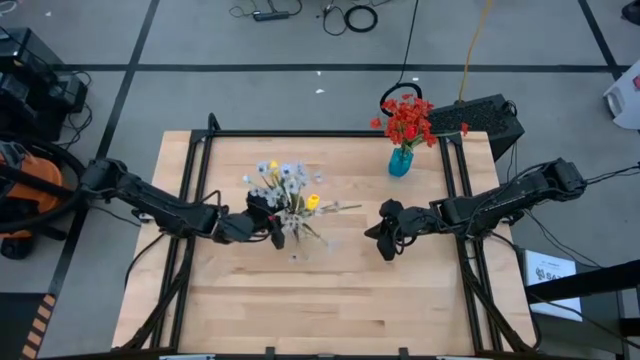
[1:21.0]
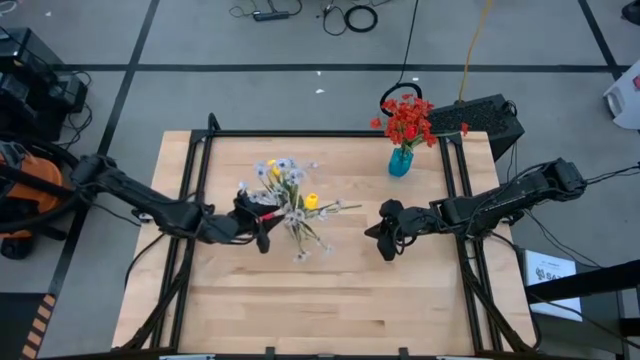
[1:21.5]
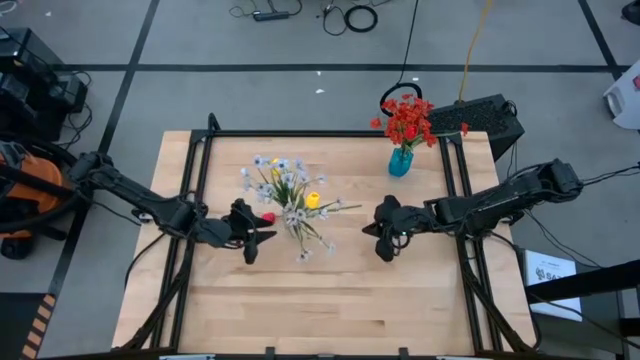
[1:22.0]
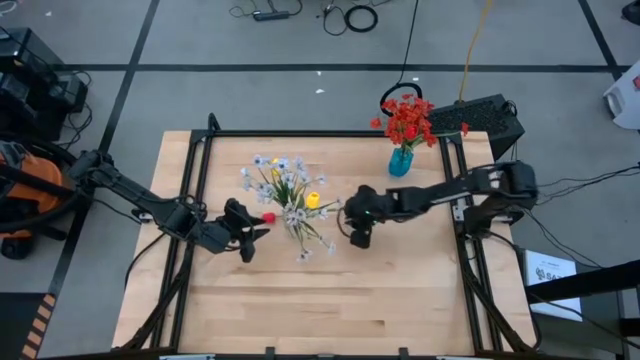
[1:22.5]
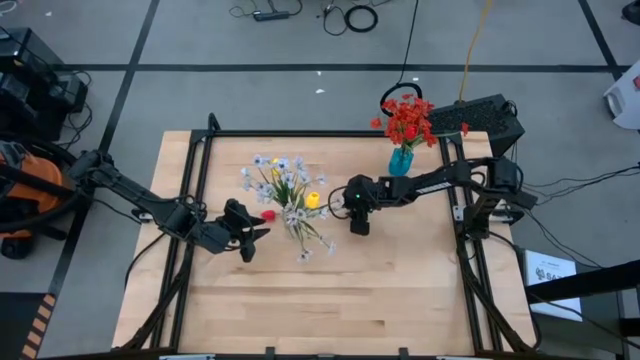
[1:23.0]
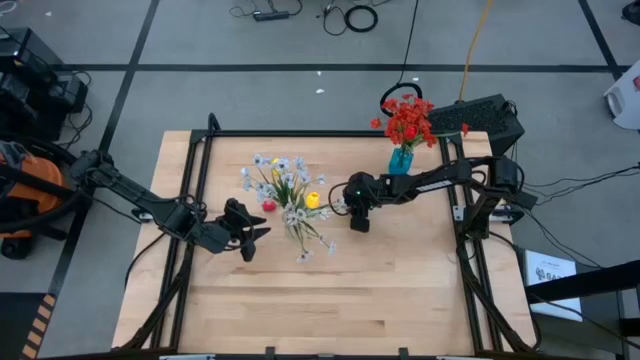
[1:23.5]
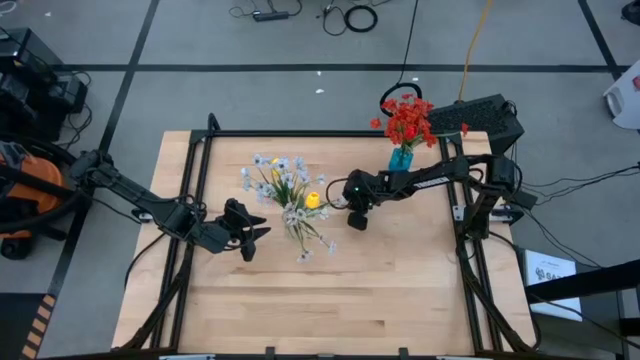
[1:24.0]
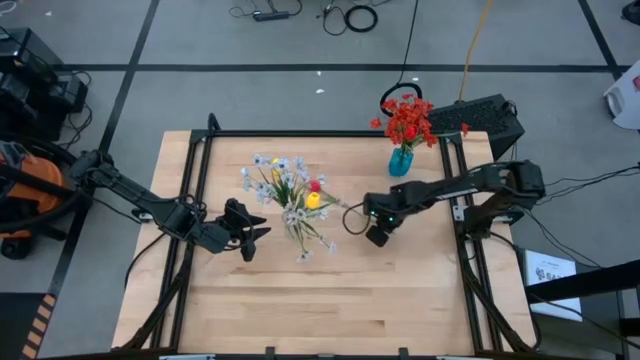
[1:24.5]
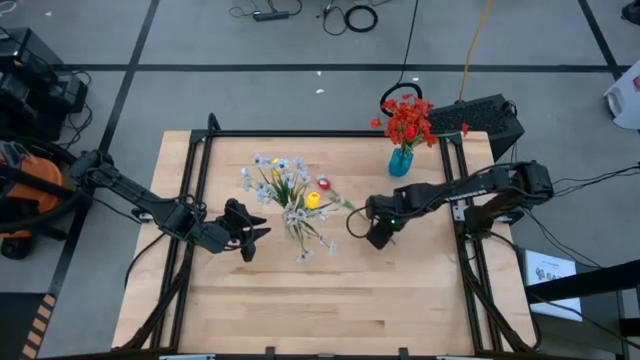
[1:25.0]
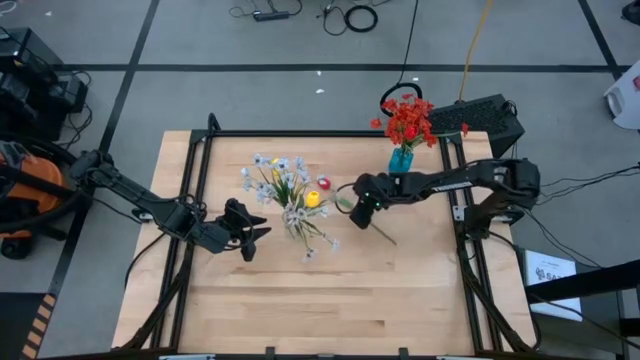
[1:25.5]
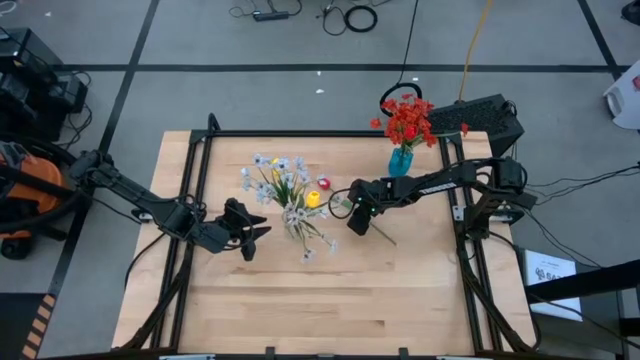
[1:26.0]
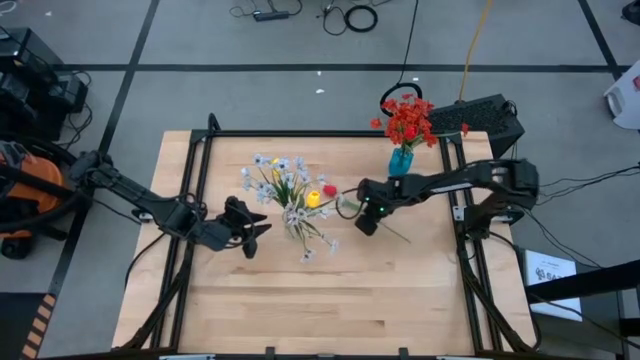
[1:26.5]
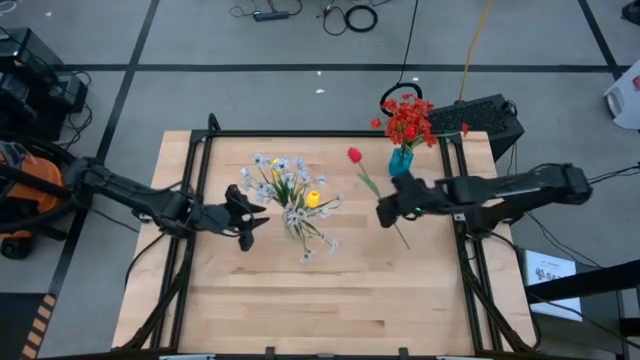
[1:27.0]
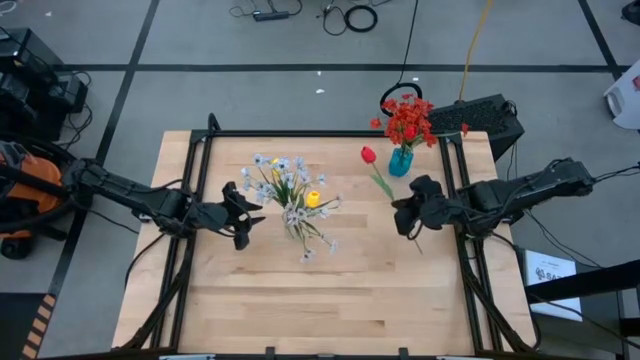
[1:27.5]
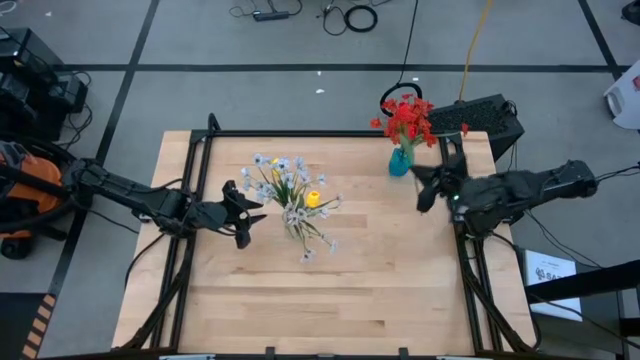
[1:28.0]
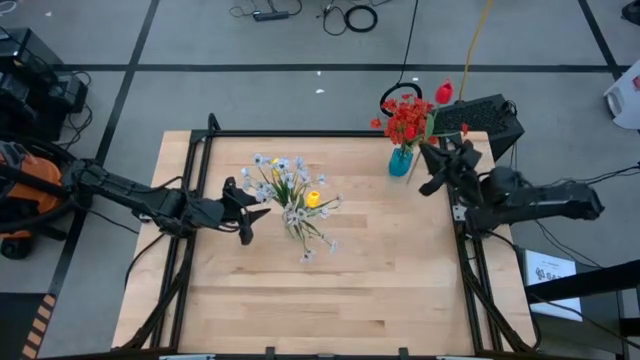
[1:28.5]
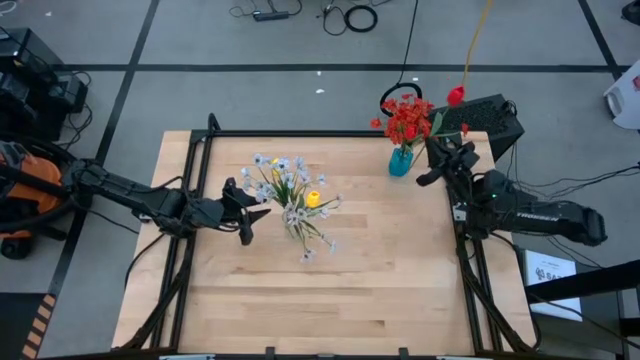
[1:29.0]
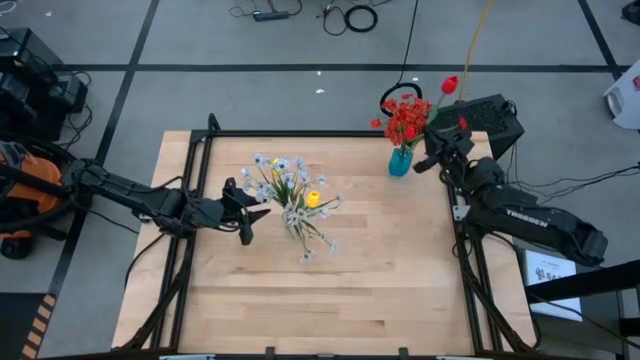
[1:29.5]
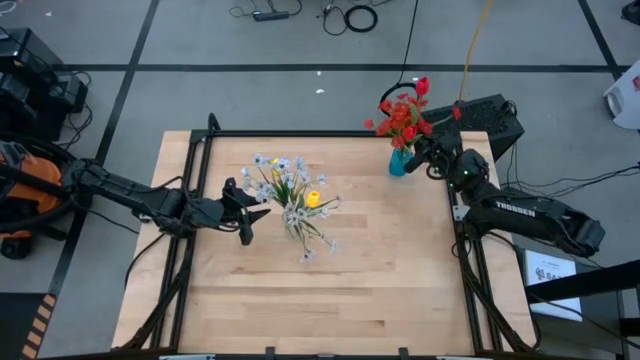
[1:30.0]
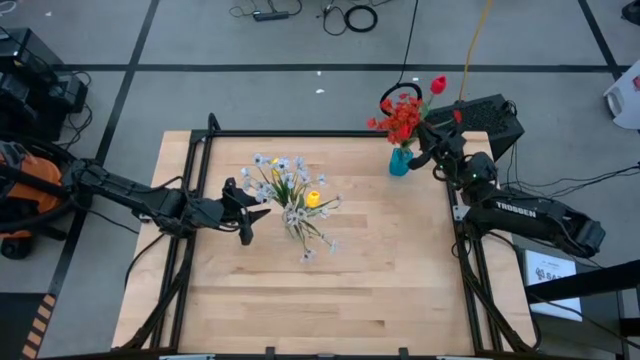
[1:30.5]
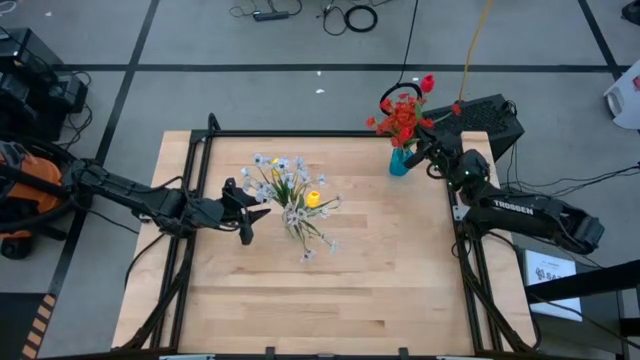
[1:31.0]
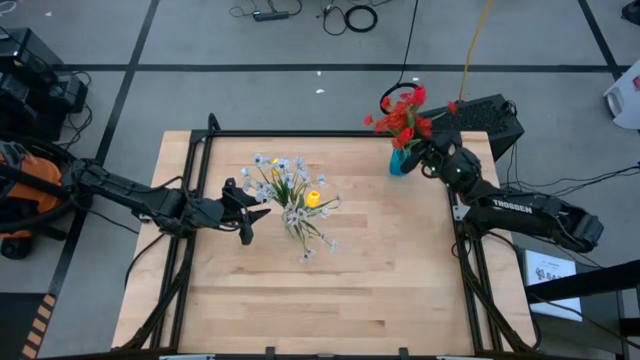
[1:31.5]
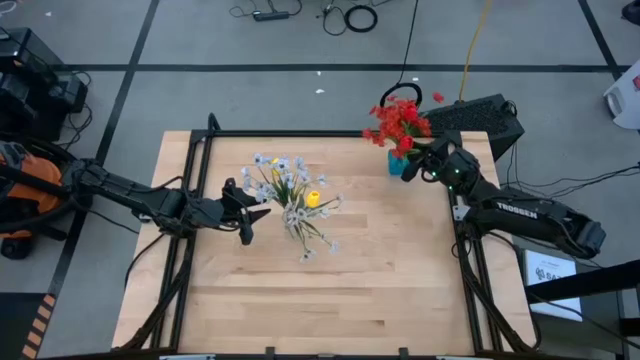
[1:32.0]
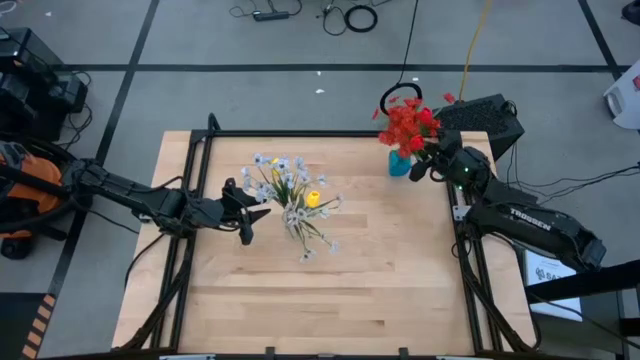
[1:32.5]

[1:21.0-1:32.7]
Task: Sort flowers into vase by color
Put the red flower into the blue flower vase

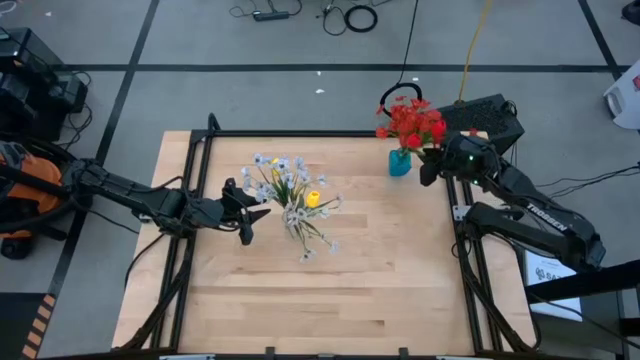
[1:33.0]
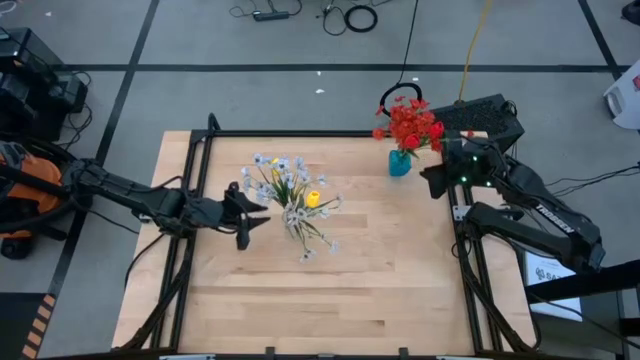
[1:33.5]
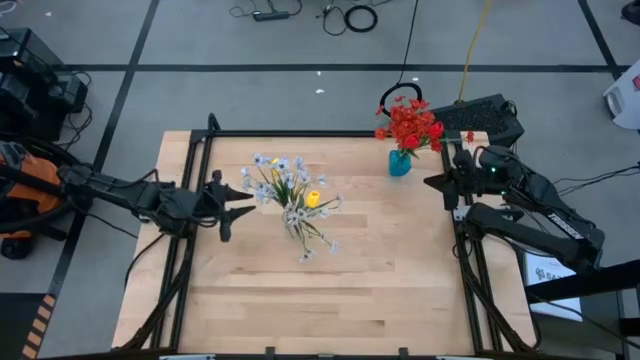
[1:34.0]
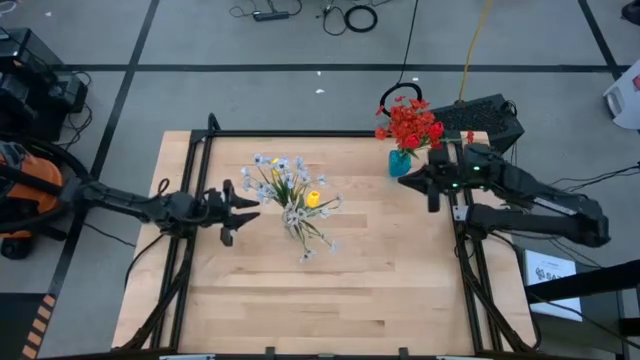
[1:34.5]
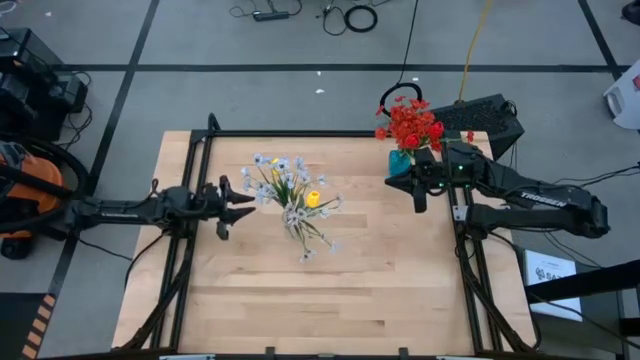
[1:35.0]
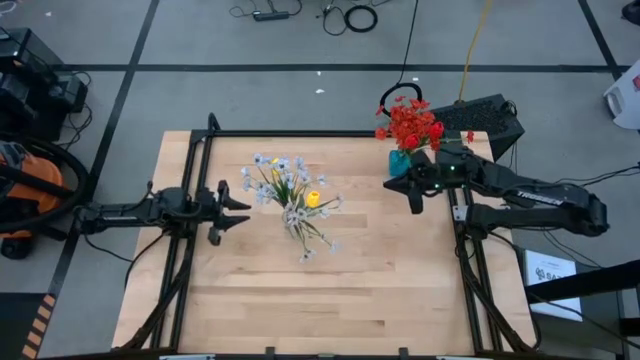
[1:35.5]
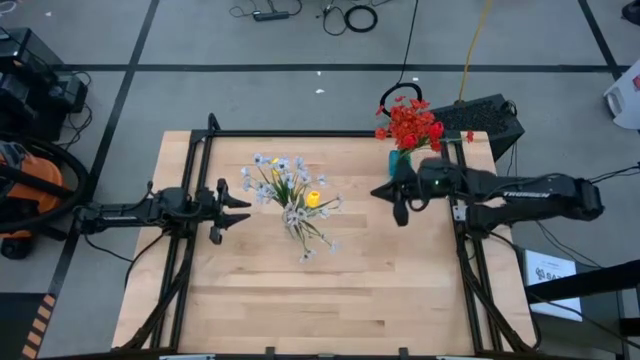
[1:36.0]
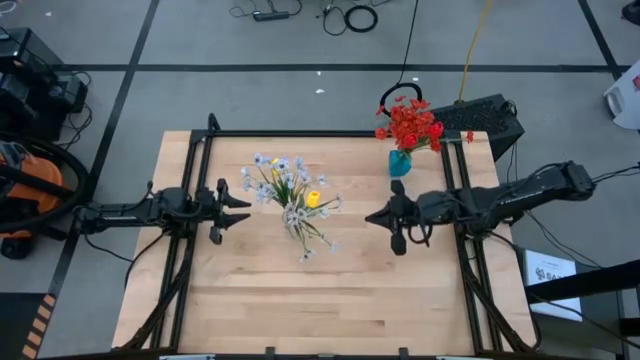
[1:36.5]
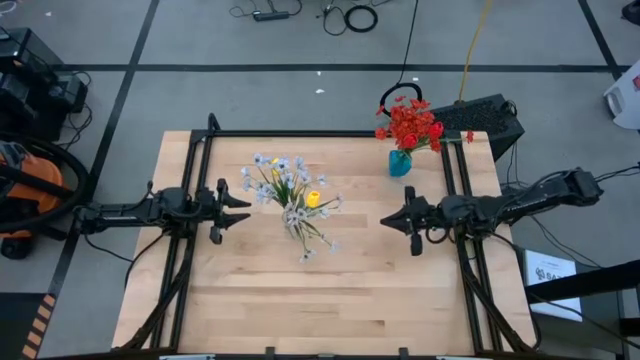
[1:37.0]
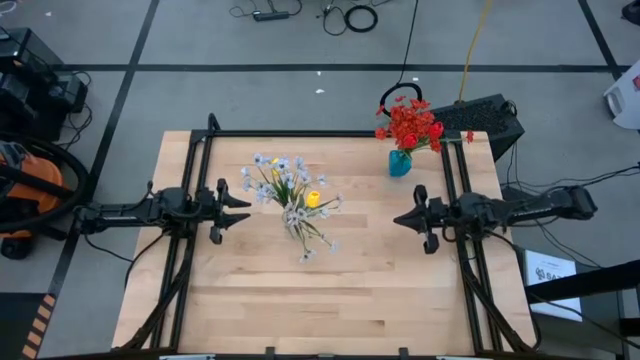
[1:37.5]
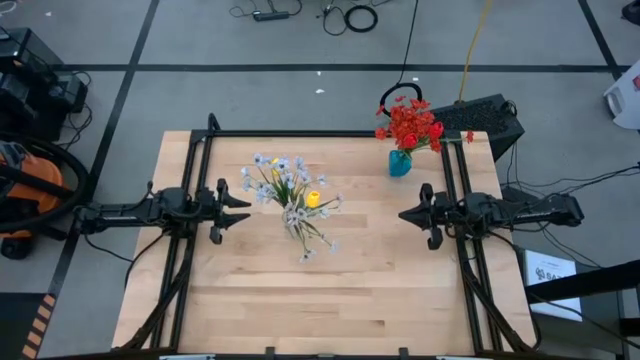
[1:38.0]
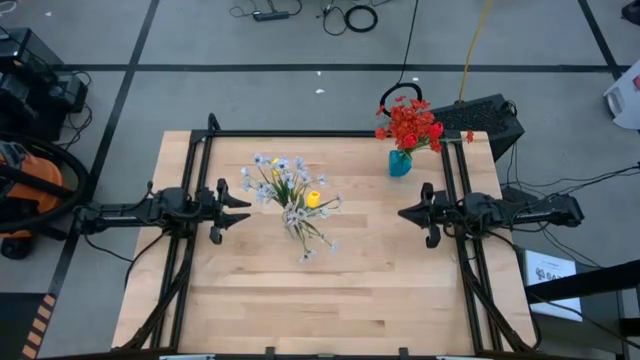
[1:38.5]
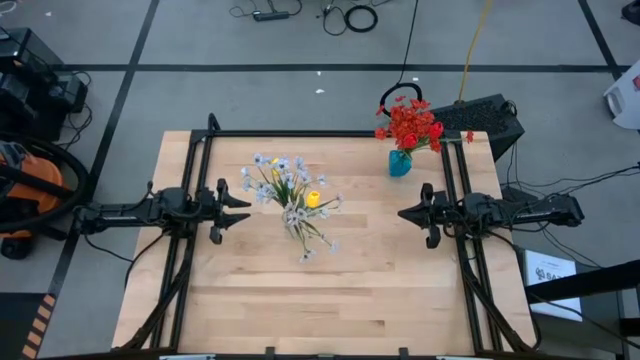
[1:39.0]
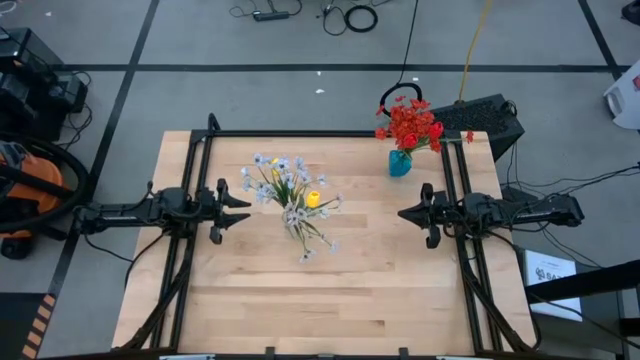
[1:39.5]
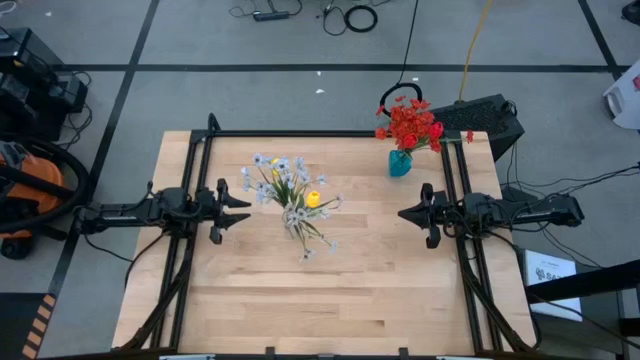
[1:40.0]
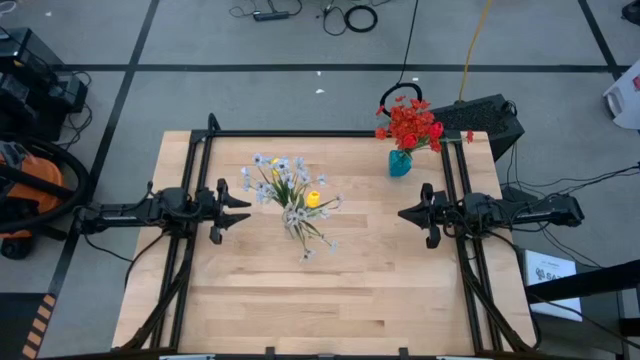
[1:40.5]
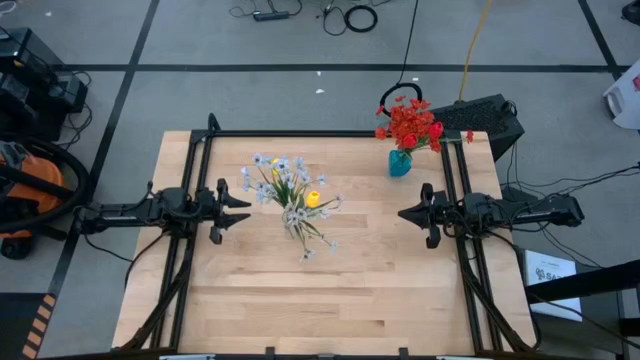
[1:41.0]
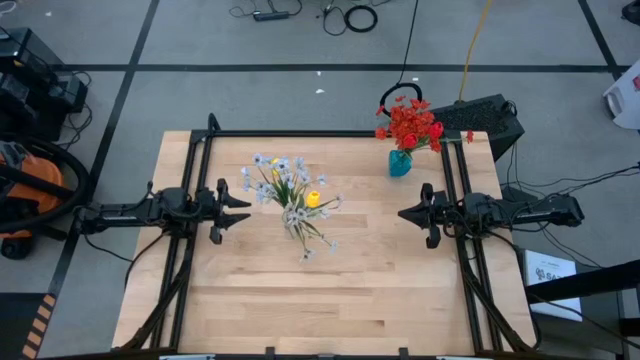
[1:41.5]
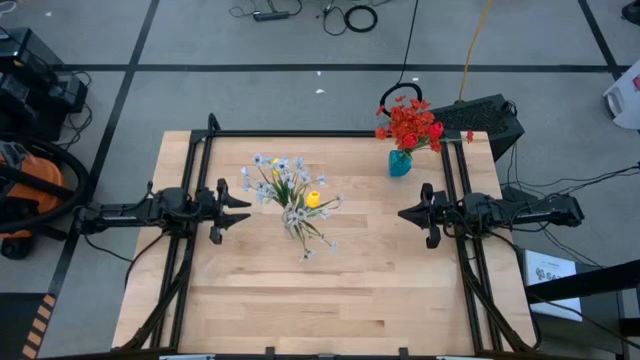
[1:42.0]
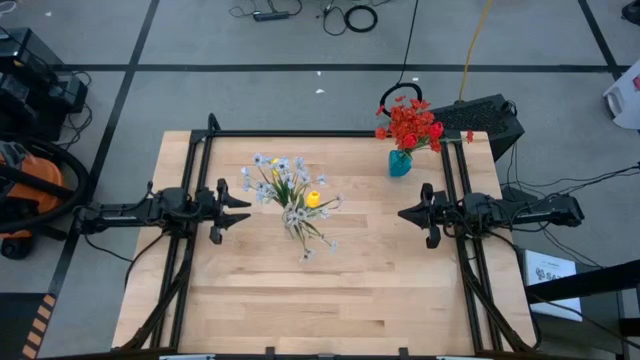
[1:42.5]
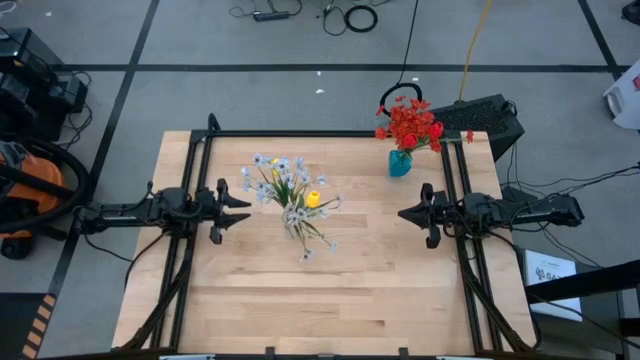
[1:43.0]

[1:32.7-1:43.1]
Return to Home Position
